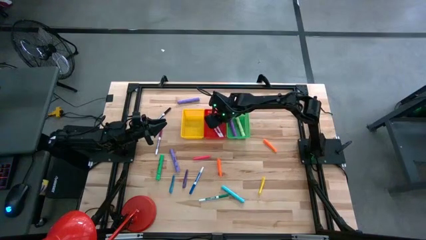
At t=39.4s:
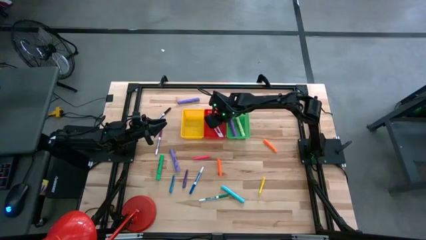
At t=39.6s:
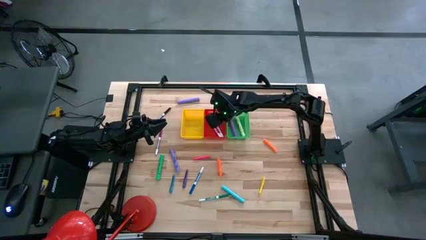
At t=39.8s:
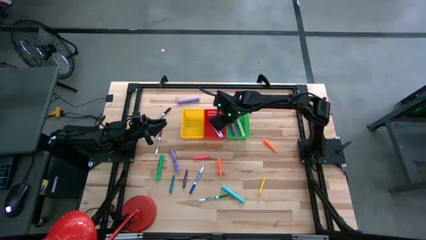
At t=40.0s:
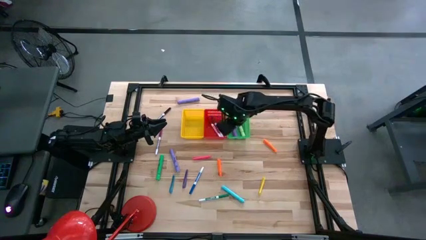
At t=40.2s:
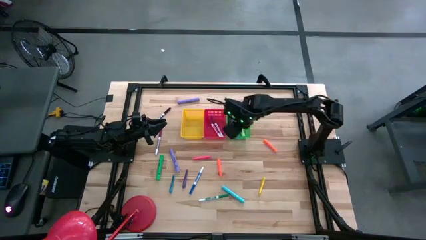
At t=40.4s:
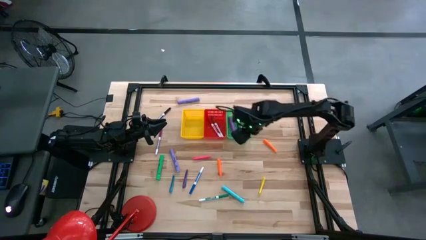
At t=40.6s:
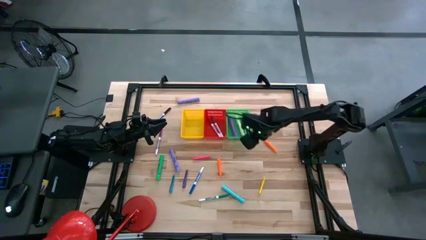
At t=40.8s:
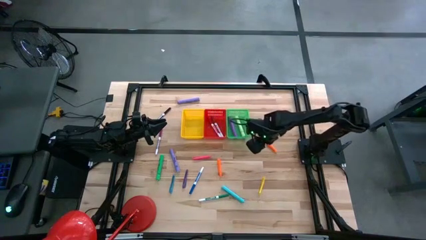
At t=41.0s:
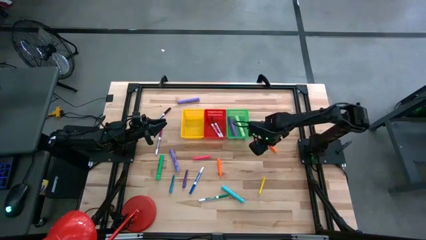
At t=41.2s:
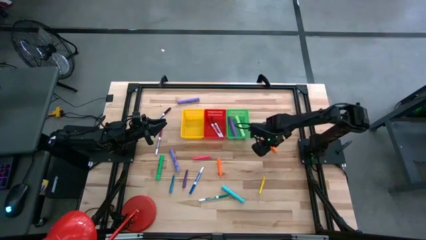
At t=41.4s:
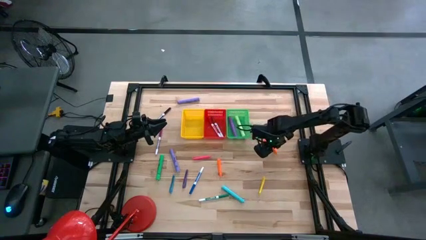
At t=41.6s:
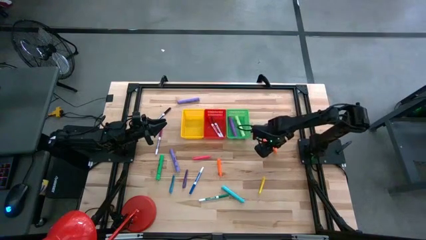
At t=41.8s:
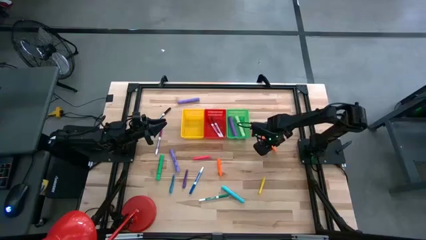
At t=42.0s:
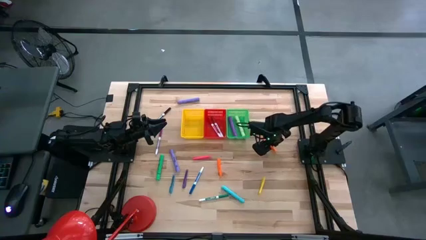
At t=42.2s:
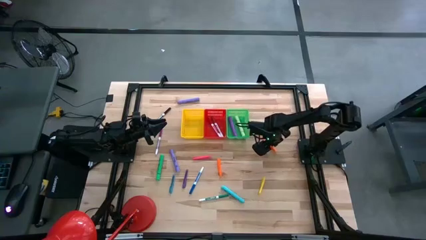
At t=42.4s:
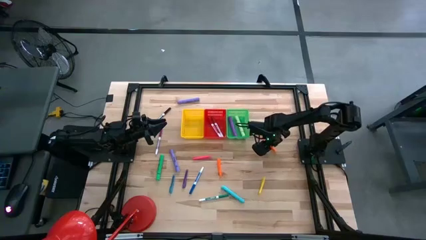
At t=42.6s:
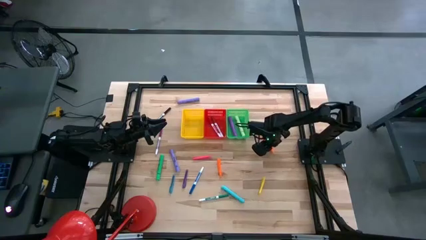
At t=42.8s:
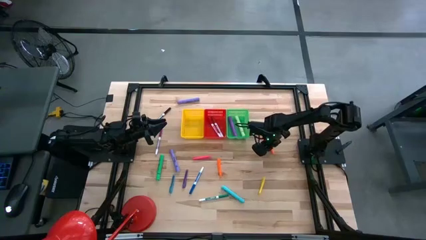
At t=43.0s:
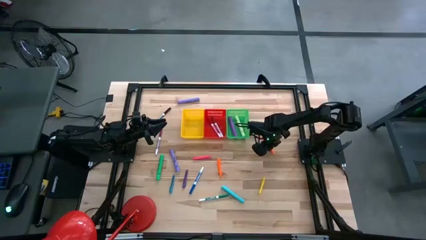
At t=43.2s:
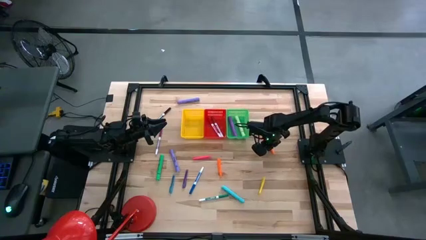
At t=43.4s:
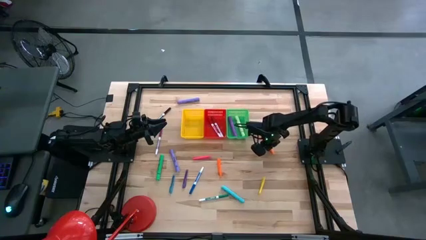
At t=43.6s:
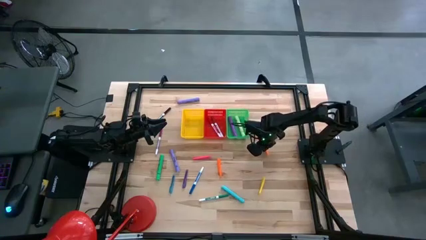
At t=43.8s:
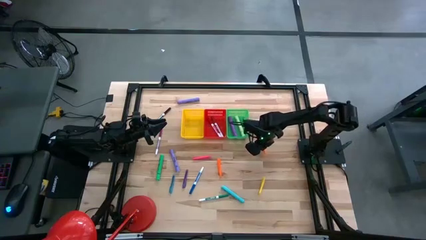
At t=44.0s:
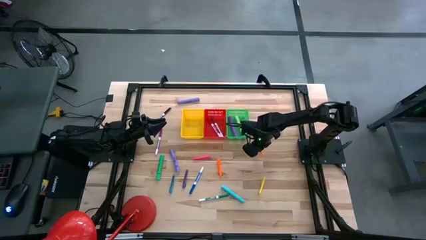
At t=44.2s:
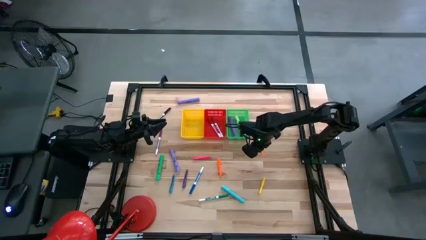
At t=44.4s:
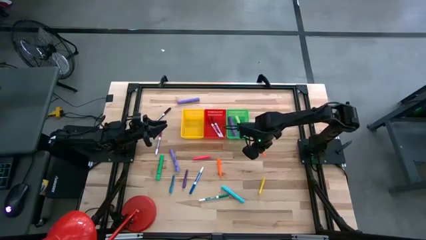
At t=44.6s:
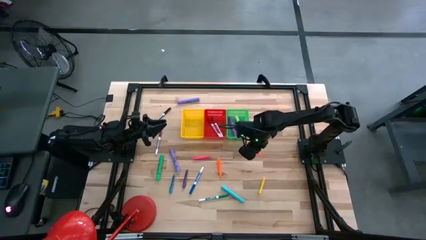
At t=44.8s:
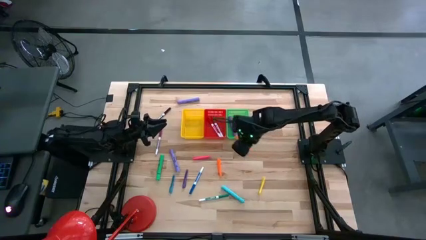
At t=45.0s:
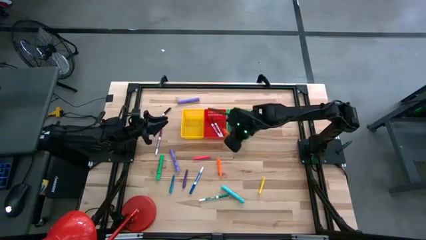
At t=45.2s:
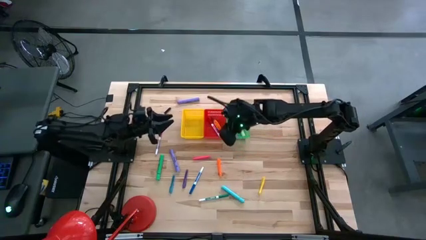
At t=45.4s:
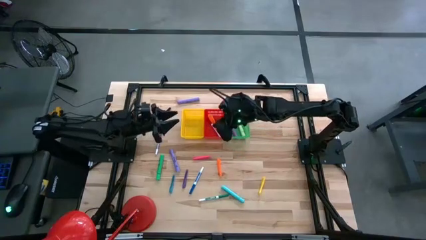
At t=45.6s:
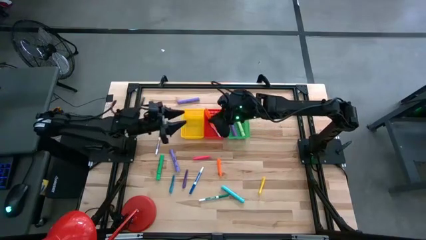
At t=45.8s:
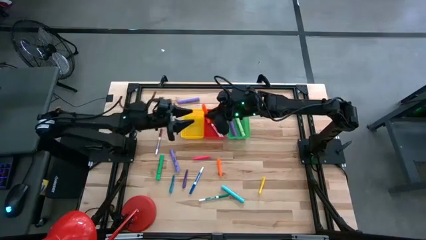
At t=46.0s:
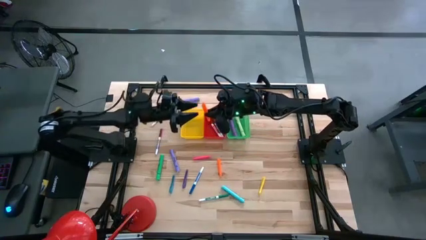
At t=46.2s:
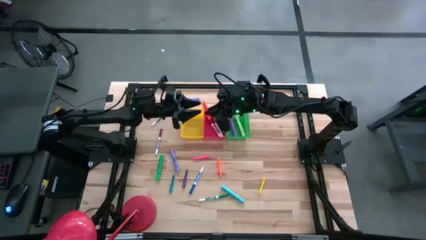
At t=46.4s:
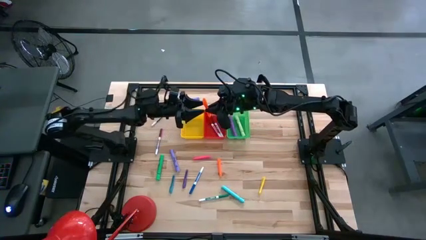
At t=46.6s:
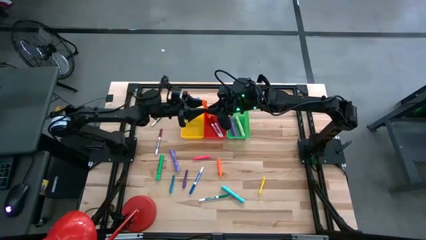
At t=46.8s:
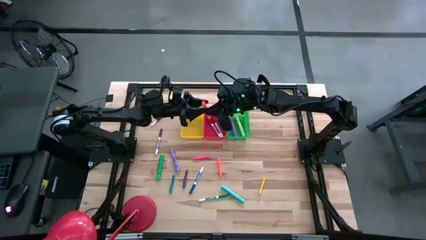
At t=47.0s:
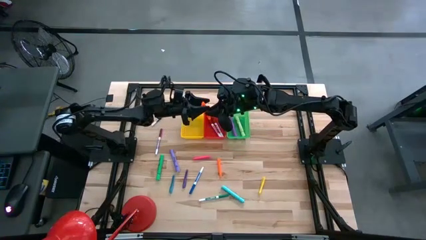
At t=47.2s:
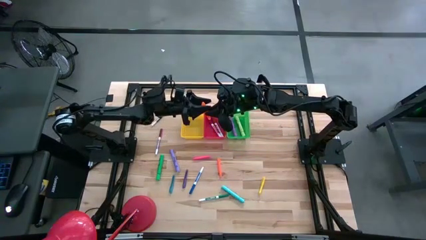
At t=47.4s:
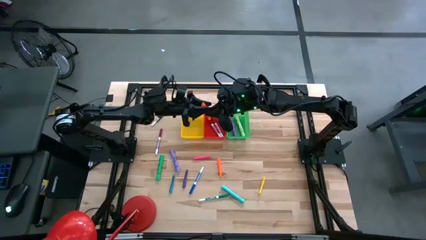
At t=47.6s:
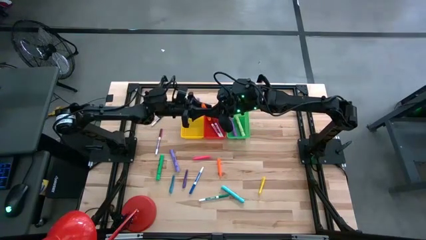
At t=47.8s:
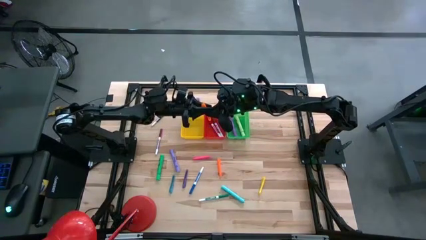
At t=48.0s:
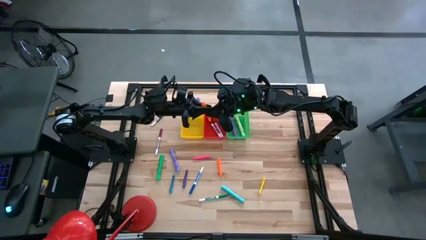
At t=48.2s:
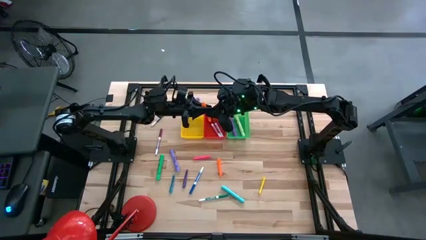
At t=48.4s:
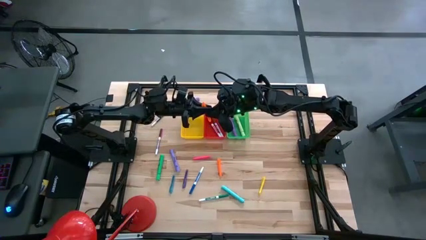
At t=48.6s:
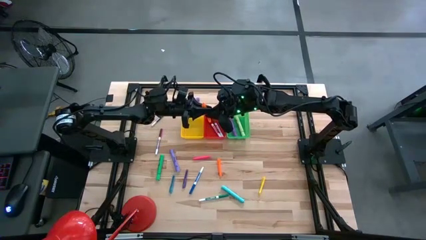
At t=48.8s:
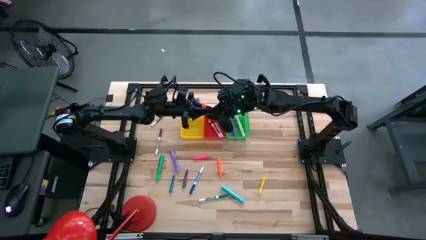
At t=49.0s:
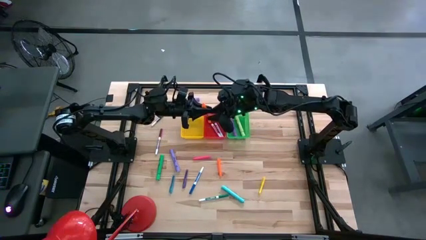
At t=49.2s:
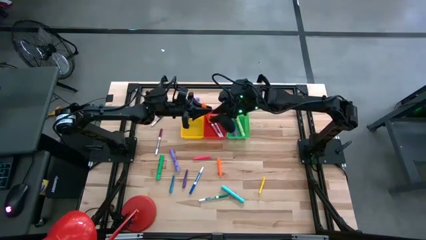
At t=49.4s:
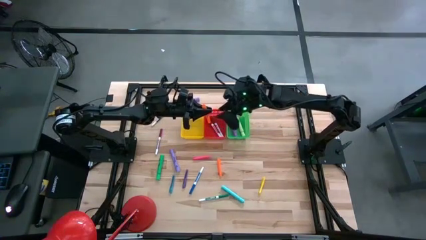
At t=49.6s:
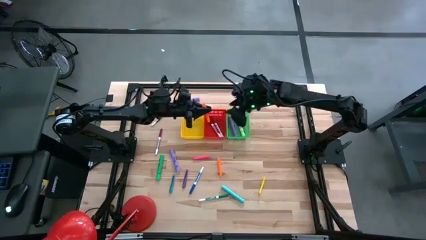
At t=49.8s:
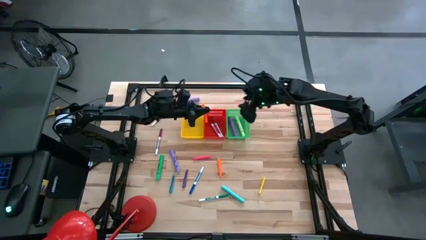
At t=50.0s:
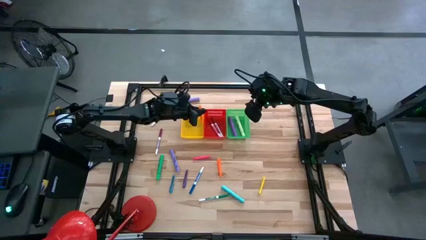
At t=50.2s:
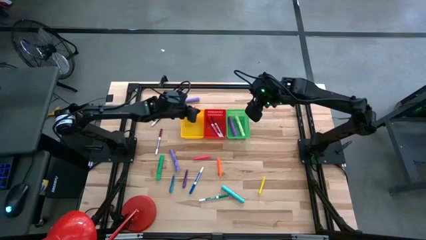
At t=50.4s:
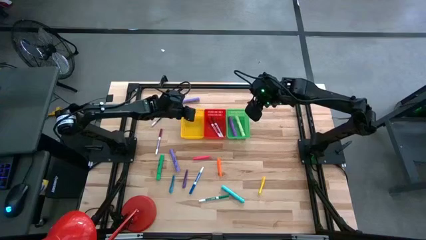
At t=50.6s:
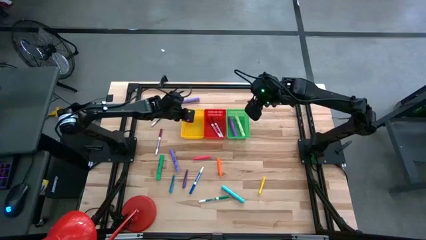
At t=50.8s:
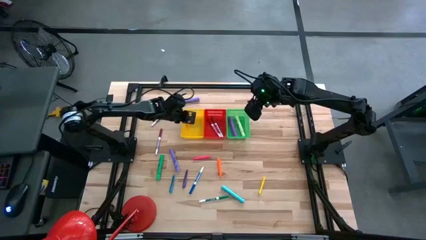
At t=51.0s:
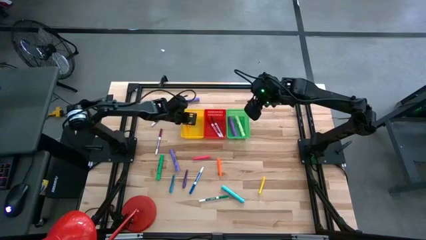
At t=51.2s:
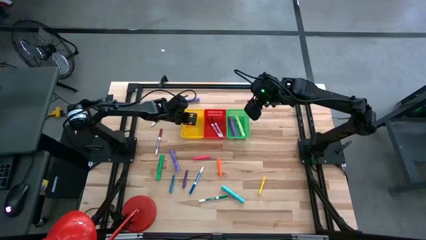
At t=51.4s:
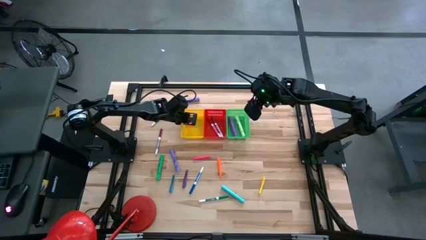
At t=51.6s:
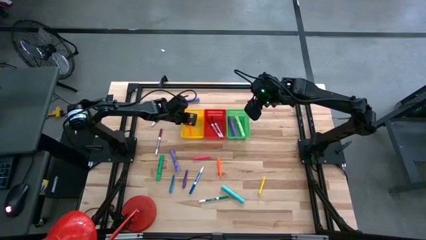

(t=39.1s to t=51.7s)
Task: Pick & Place Markers
Put the top orange pen into the yellow bin
